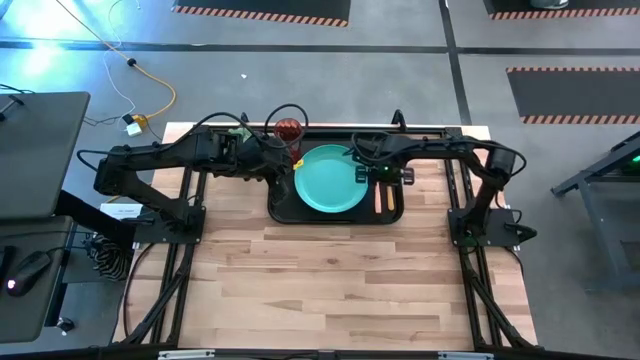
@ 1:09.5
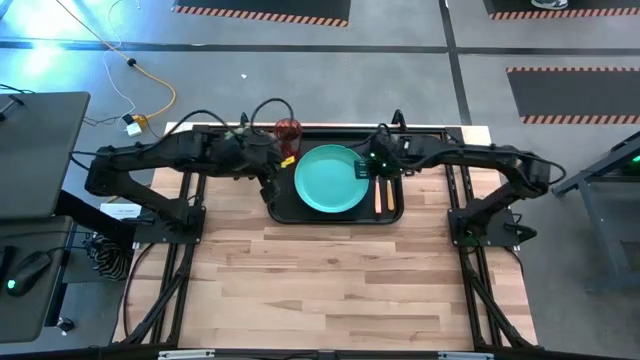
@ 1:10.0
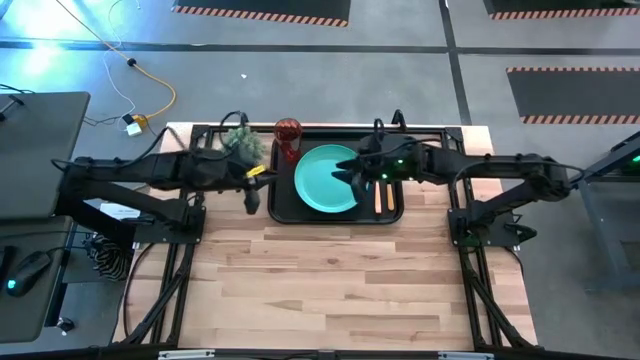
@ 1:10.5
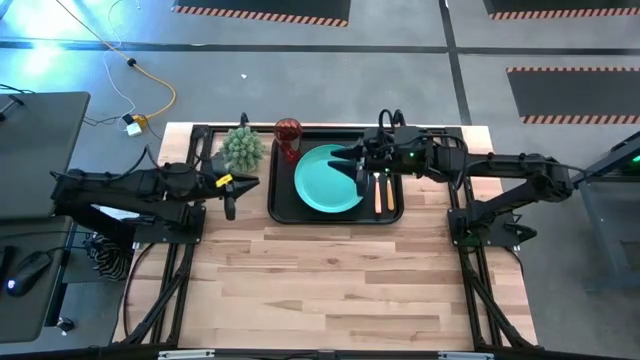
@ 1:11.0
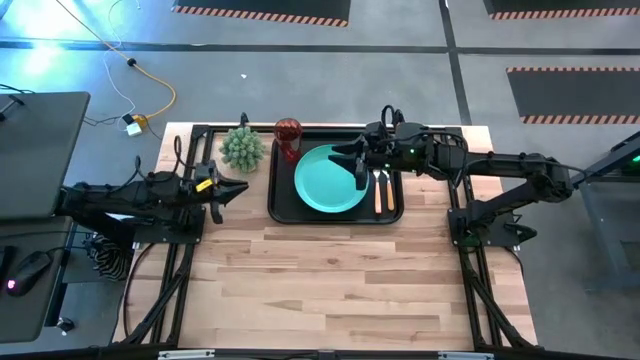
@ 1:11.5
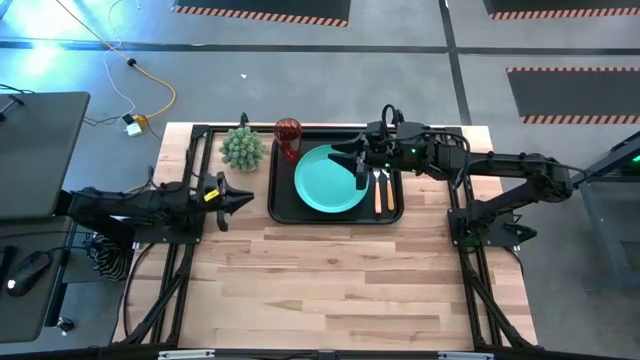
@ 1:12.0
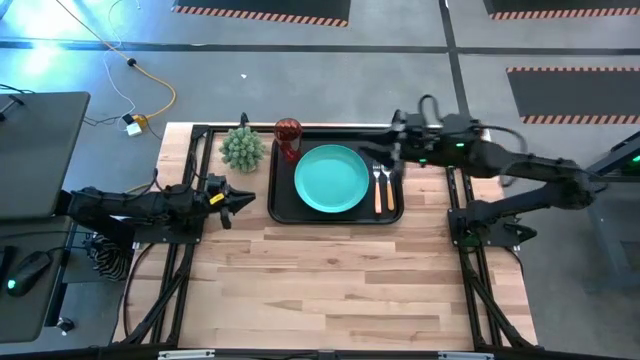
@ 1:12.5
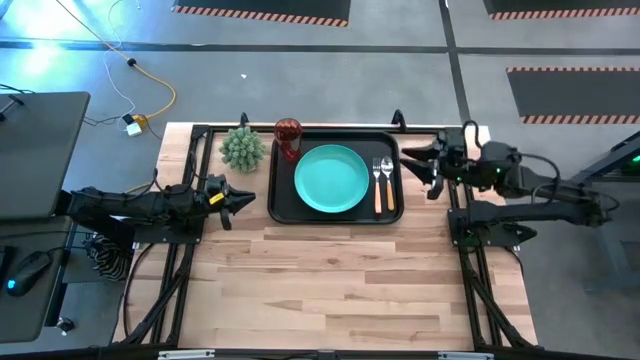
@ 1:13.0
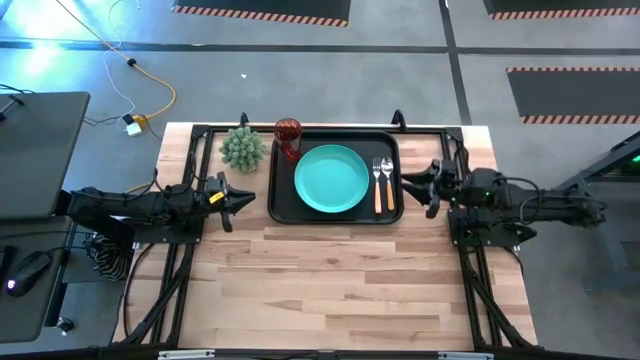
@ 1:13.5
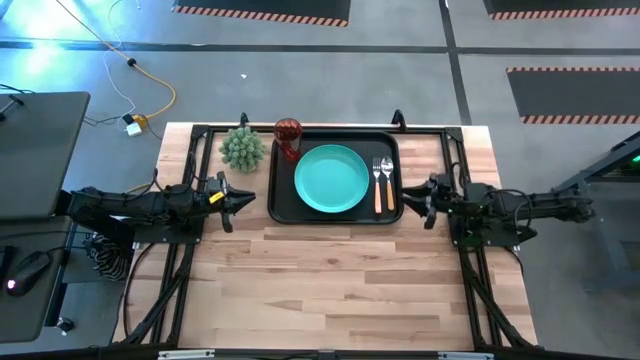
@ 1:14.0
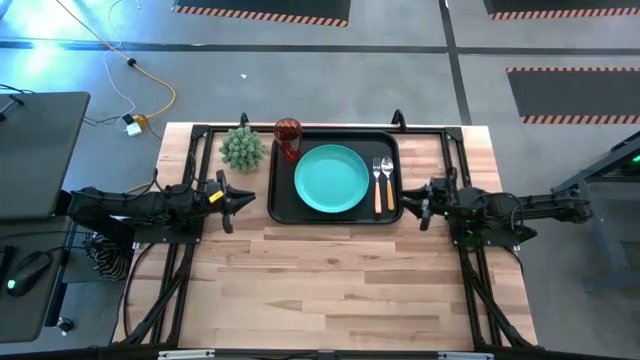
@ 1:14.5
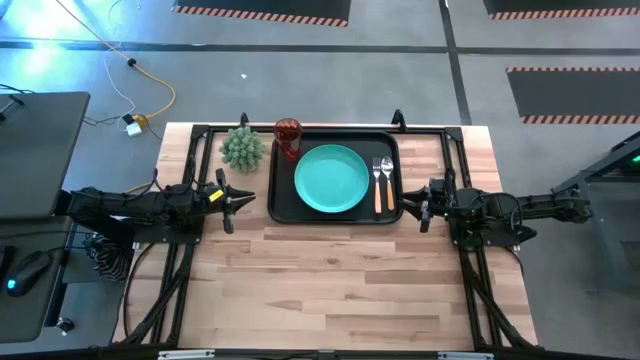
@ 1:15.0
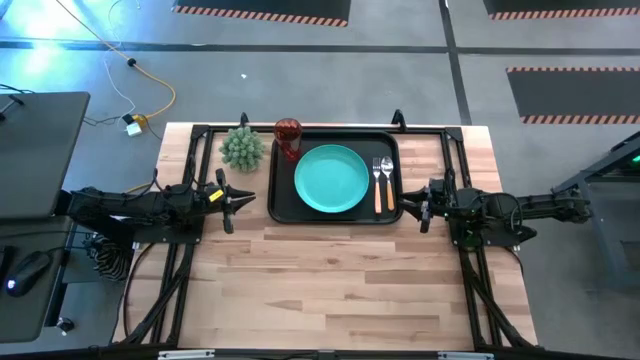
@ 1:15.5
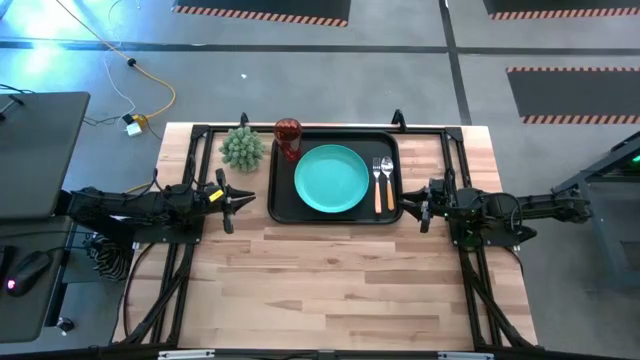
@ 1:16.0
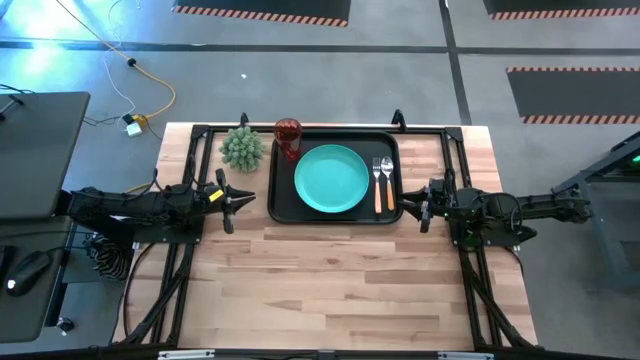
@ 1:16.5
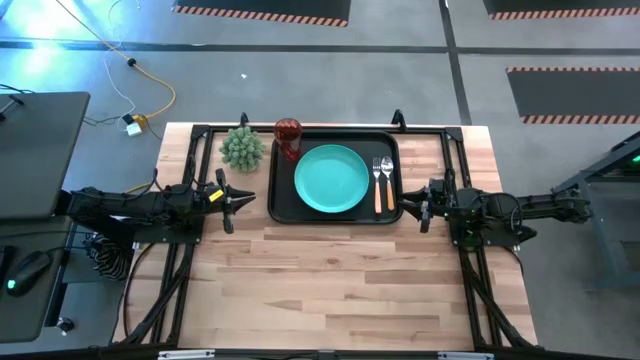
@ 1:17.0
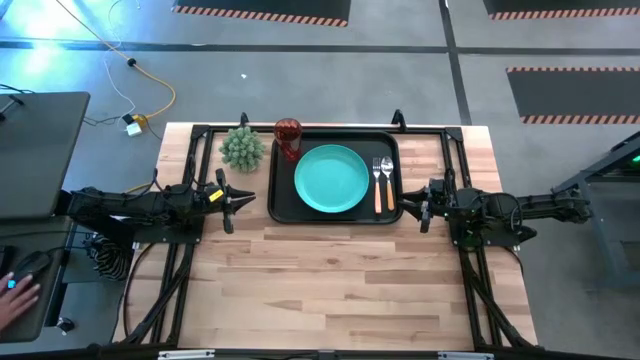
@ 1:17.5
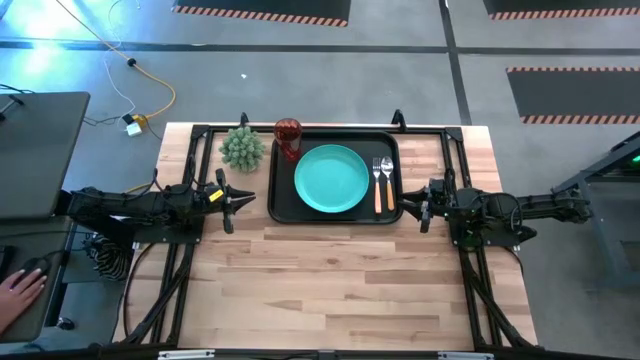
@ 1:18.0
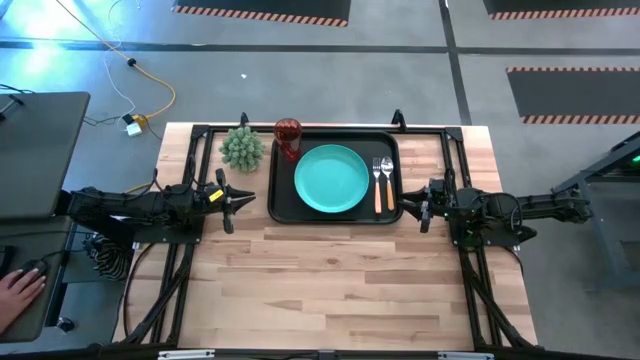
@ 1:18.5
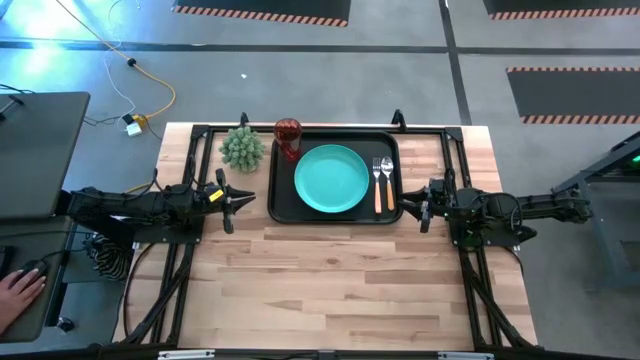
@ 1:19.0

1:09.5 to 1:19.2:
Task: Pick and place plate/cup/fork/spoon on tray
Return to Home Position
